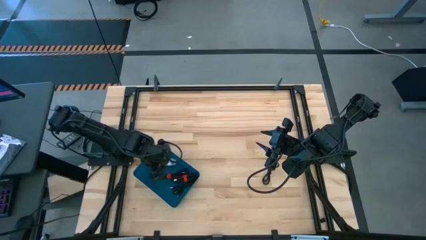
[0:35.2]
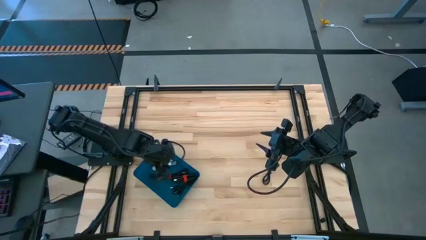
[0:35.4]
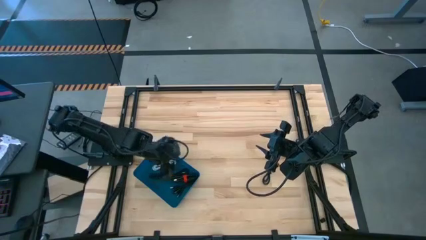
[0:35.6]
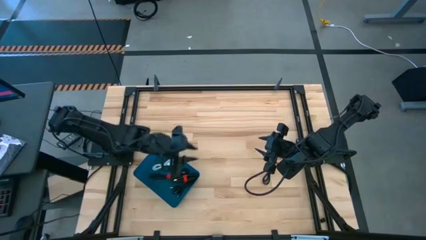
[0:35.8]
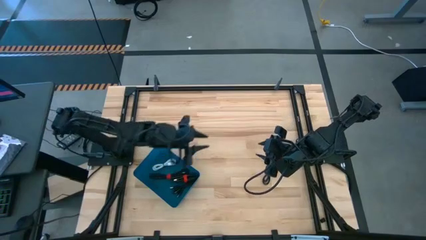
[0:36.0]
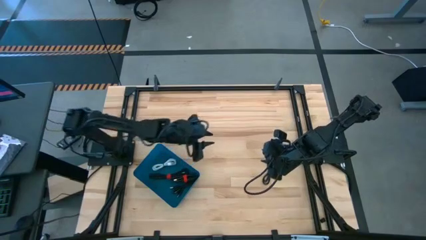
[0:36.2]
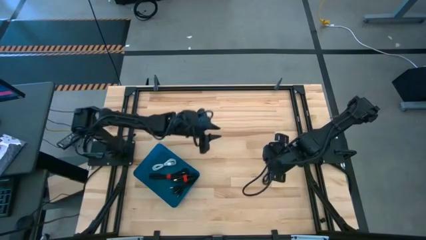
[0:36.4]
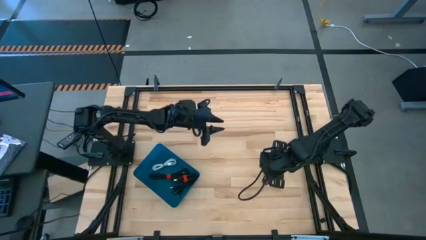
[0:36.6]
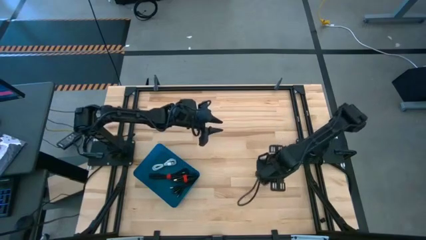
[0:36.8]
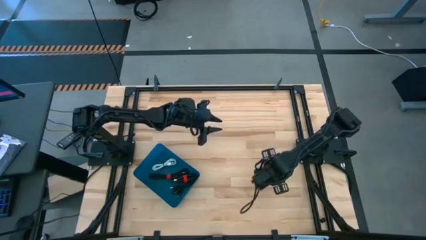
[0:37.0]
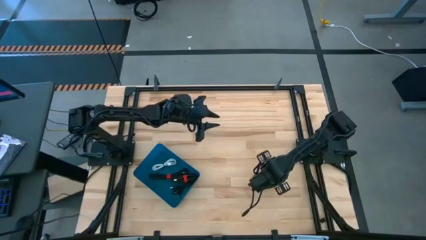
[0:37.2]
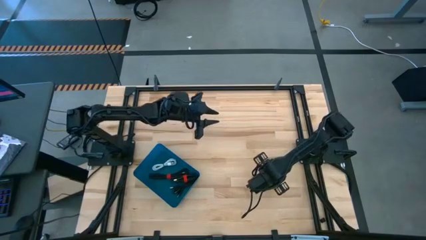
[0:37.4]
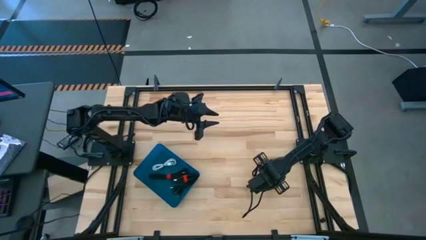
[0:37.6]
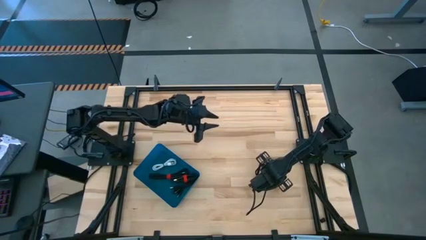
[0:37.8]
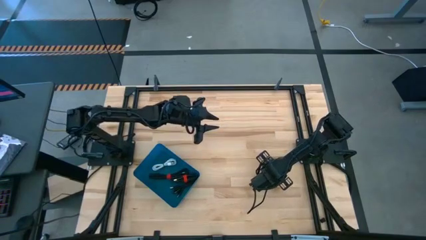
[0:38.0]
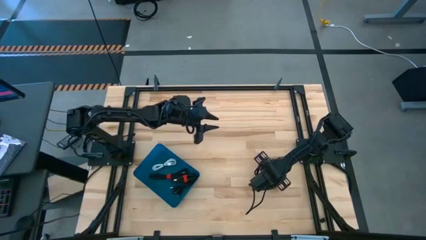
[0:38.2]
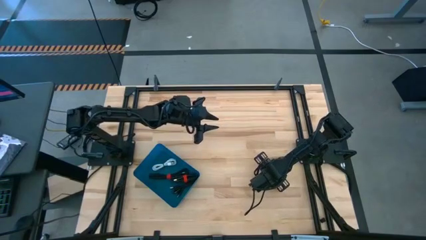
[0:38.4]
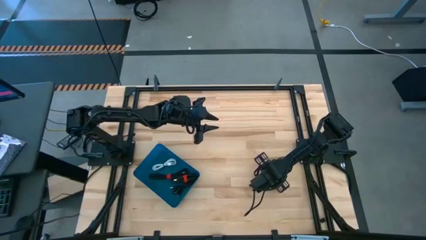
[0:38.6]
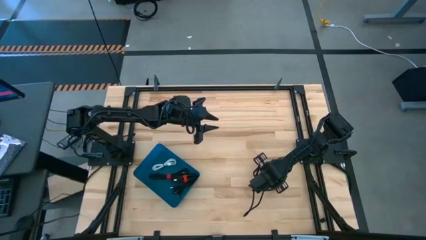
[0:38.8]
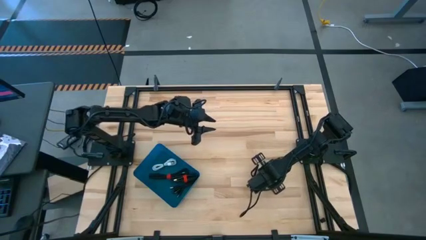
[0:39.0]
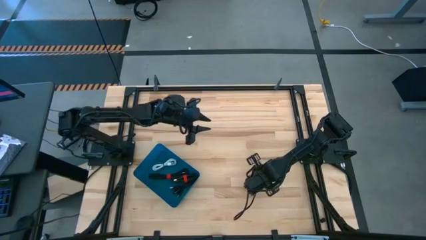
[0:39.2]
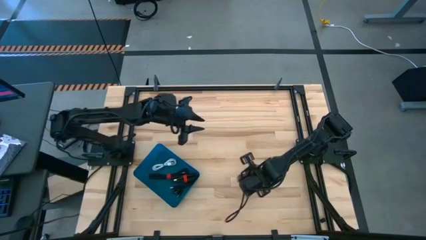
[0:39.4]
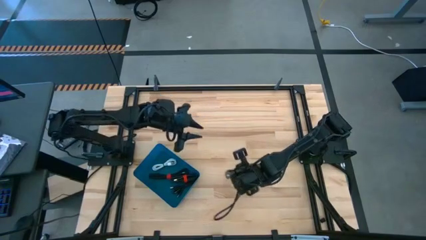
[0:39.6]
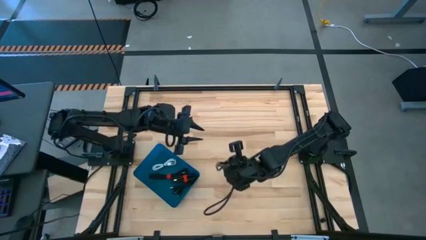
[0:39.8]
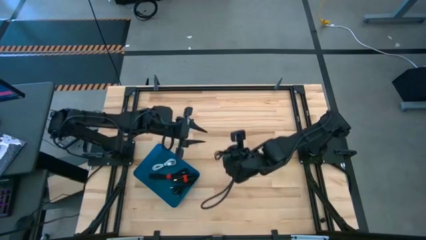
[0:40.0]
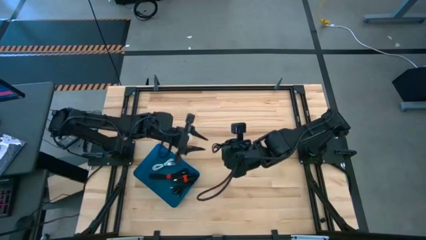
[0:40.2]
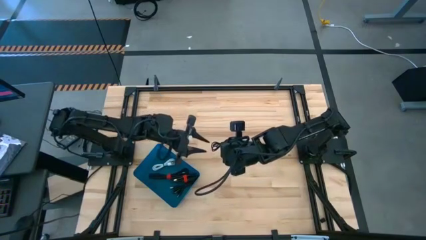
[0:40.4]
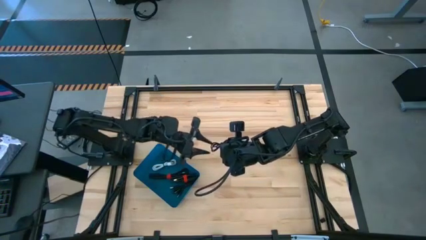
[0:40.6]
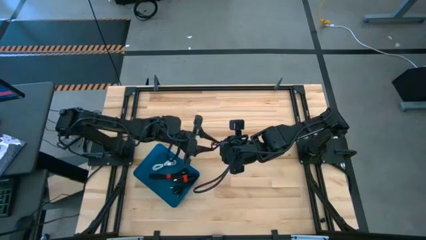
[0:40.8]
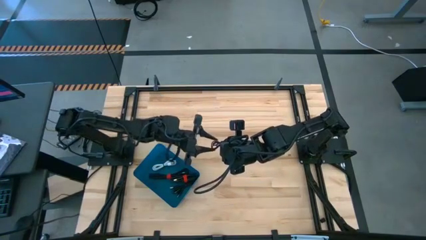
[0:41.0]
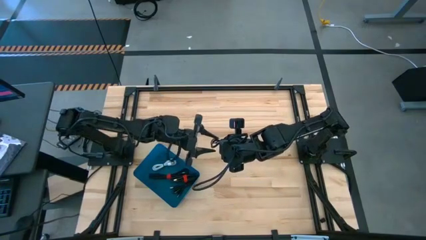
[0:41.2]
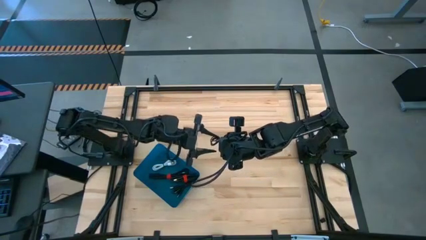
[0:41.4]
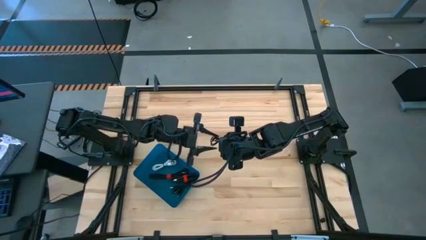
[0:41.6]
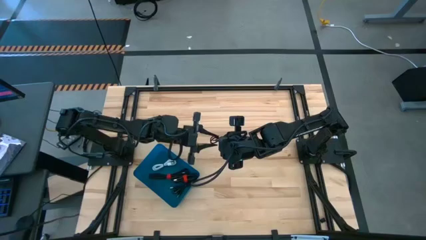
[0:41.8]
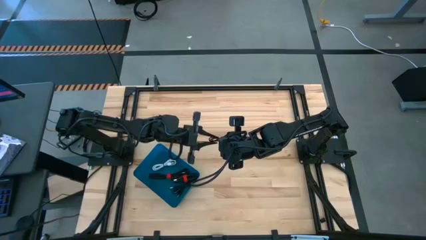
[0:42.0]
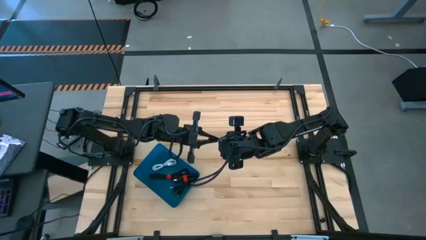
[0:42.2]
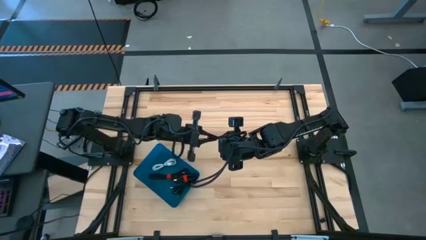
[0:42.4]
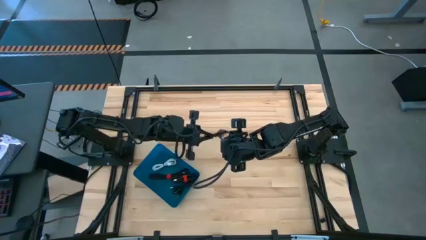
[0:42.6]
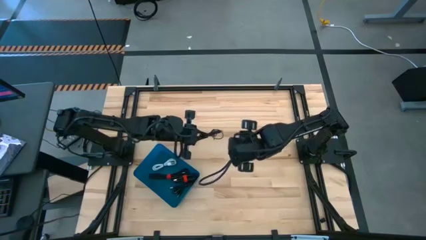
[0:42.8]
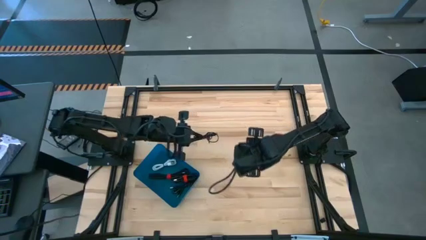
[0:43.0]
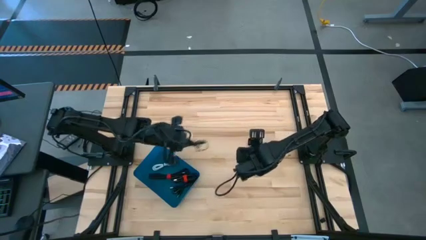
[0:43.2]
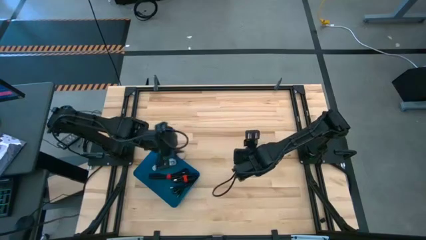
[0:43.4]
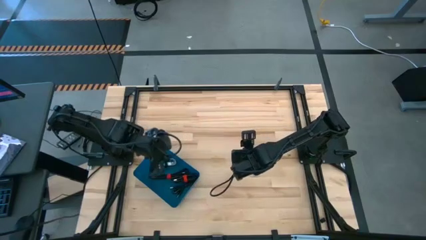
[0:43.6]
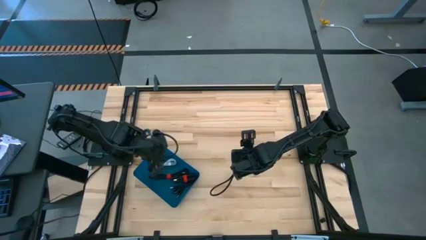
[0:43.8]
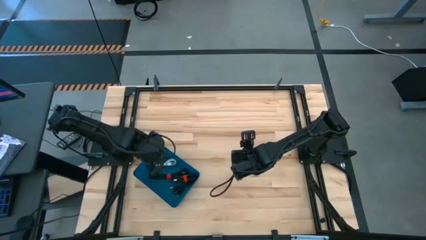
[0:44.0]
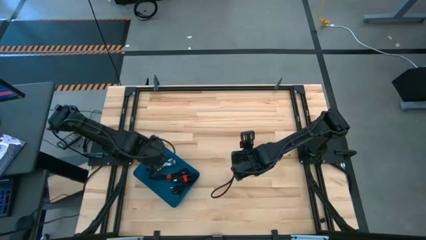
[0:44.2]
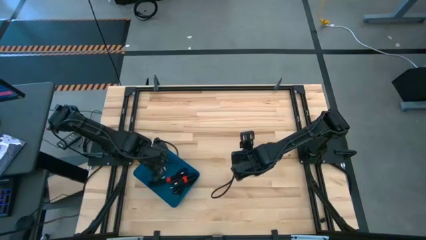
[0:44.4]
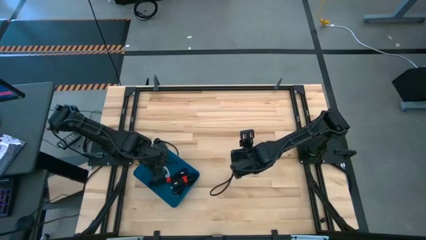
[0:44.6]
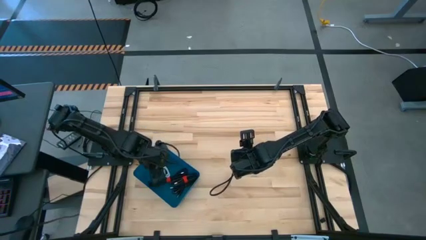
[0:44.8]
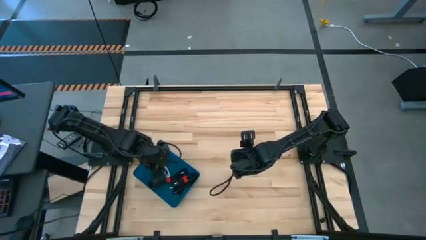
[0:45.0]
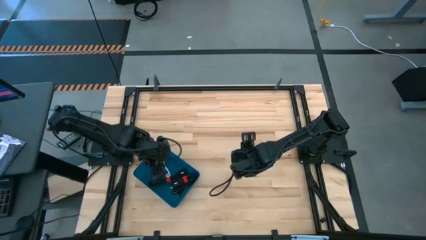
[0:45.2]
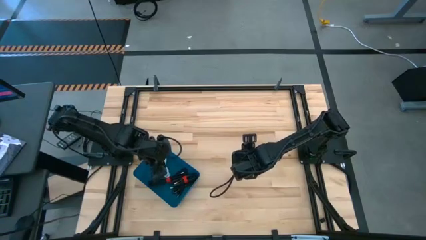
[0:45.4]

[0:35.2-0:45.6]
Task: Pick and place USB-C Cables
Put the black charger cable into the blue bin

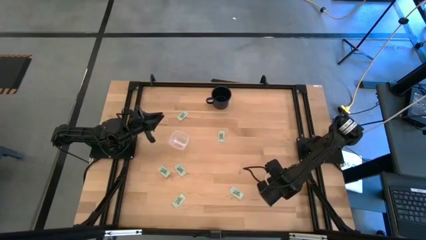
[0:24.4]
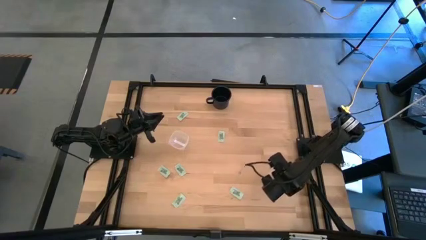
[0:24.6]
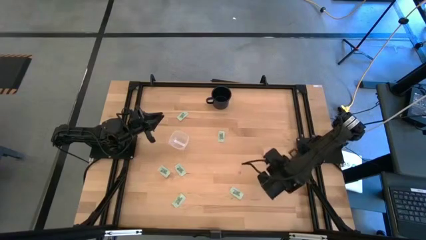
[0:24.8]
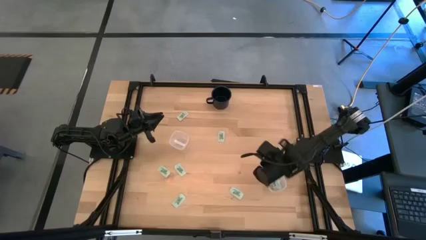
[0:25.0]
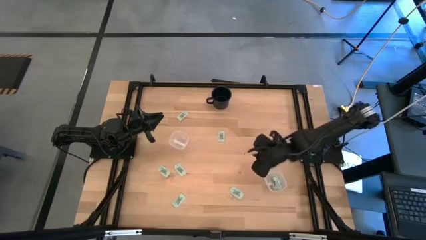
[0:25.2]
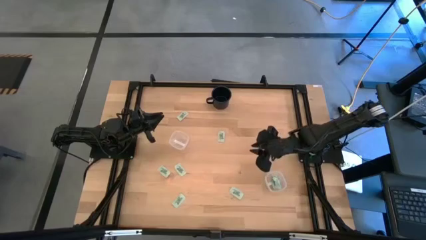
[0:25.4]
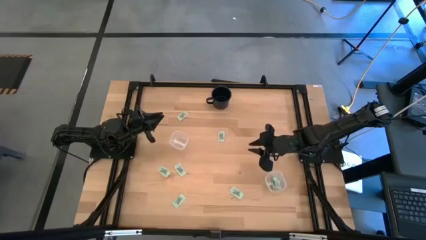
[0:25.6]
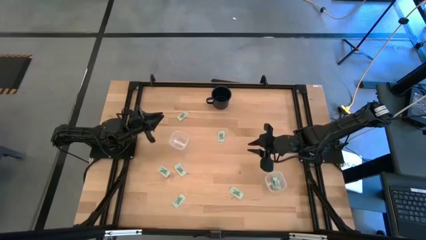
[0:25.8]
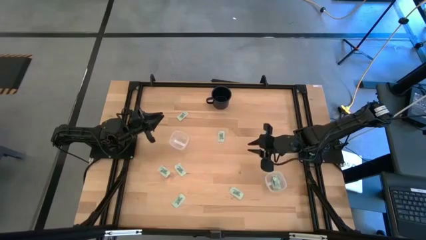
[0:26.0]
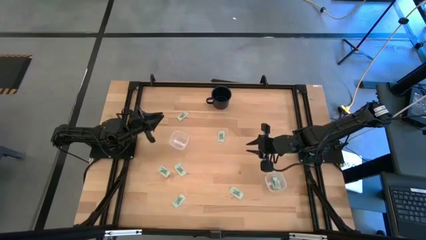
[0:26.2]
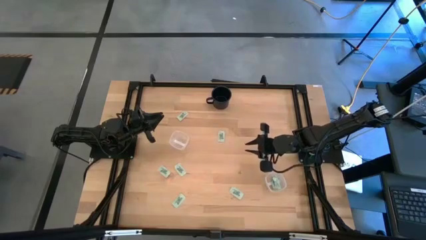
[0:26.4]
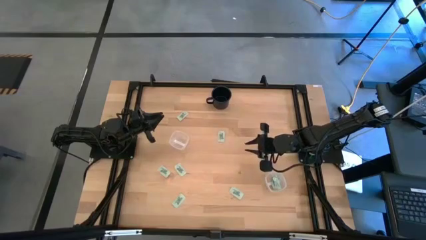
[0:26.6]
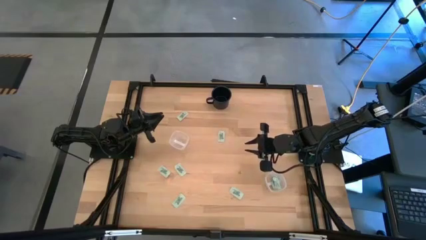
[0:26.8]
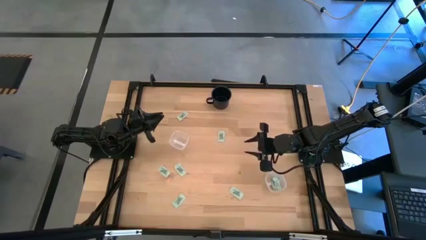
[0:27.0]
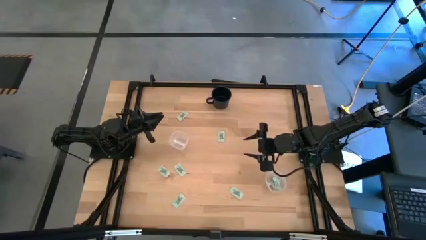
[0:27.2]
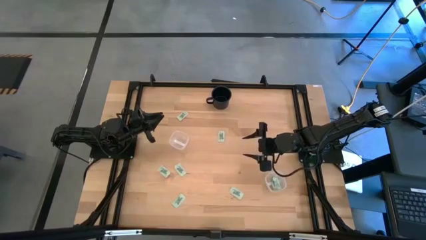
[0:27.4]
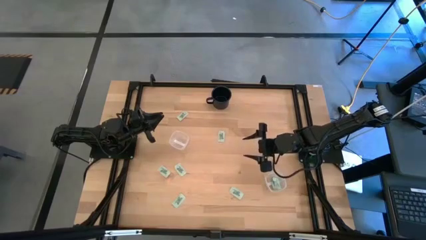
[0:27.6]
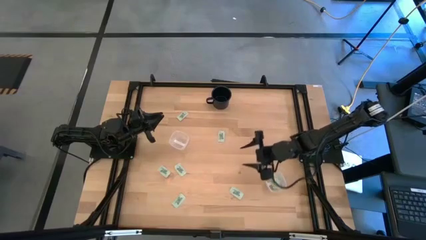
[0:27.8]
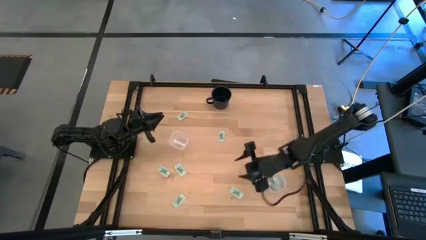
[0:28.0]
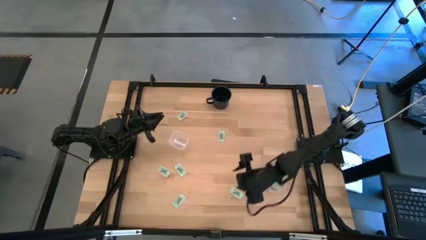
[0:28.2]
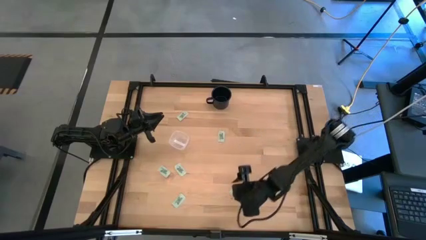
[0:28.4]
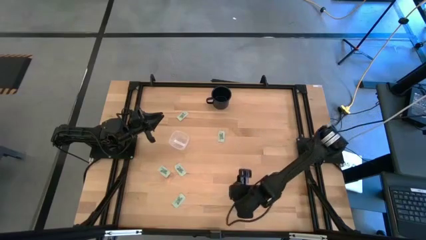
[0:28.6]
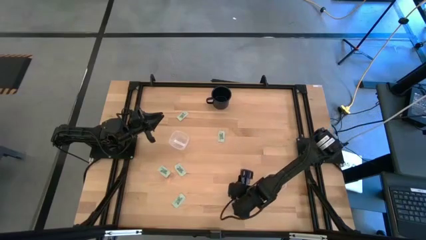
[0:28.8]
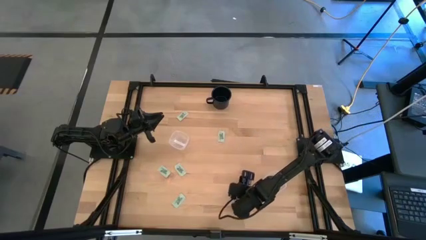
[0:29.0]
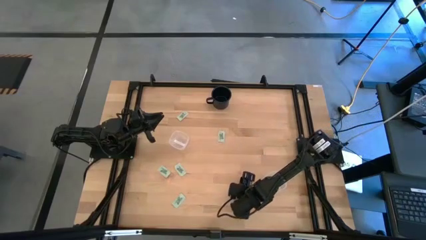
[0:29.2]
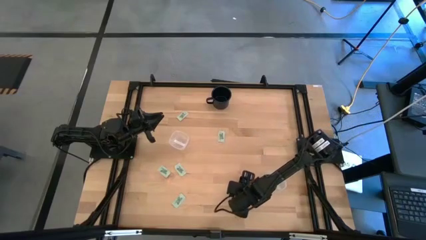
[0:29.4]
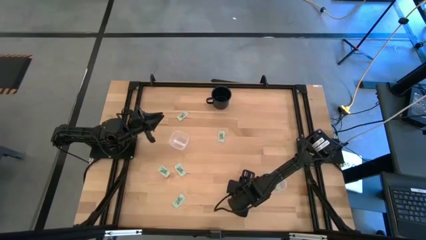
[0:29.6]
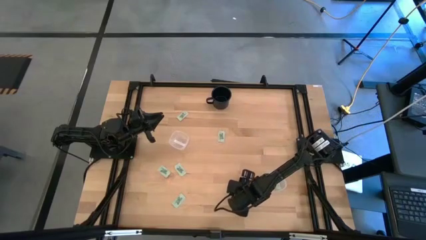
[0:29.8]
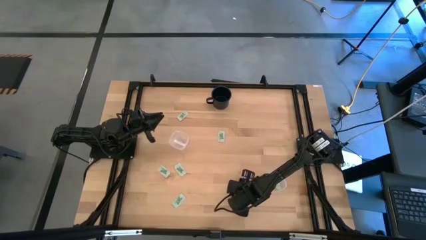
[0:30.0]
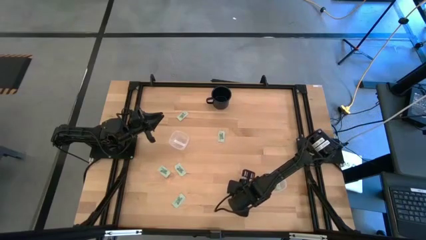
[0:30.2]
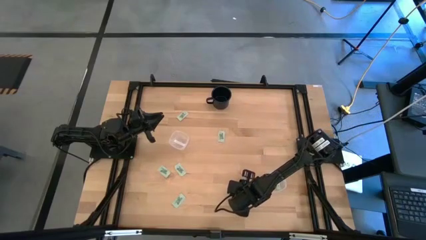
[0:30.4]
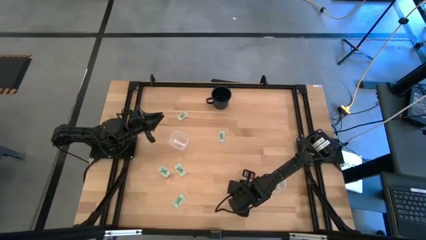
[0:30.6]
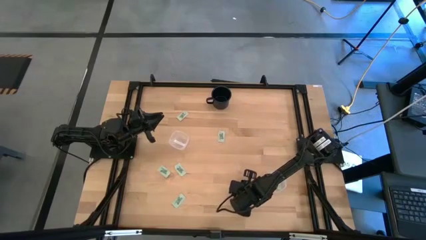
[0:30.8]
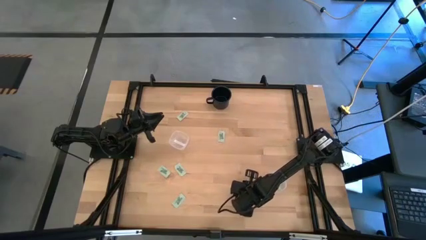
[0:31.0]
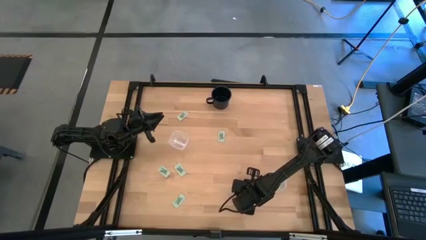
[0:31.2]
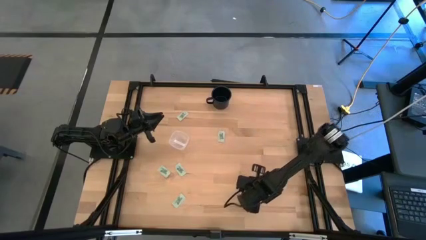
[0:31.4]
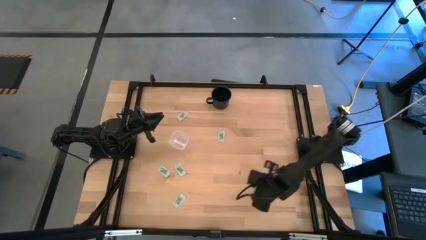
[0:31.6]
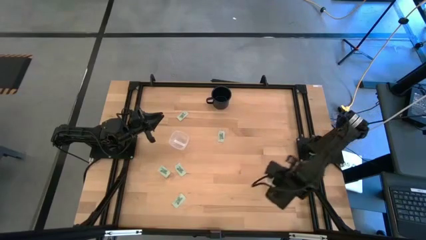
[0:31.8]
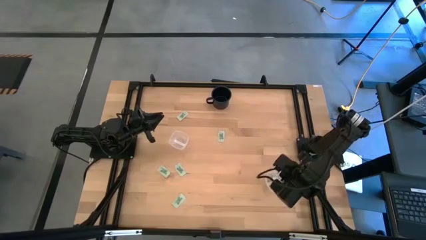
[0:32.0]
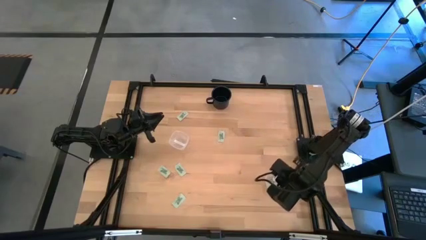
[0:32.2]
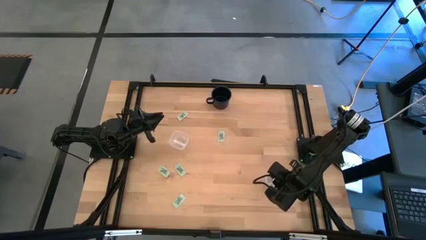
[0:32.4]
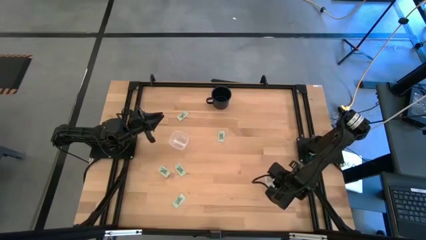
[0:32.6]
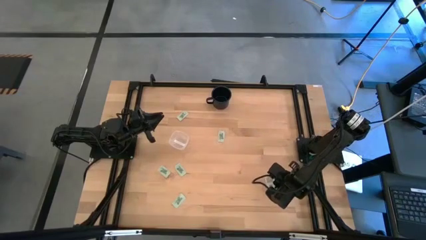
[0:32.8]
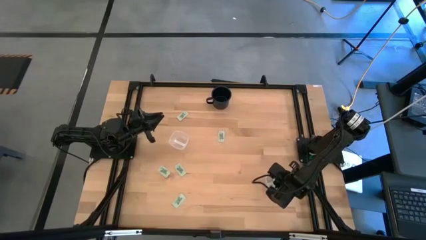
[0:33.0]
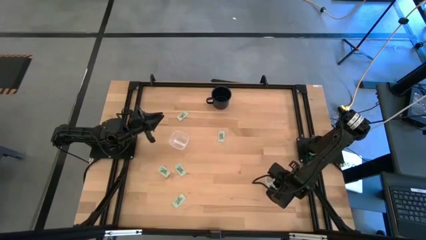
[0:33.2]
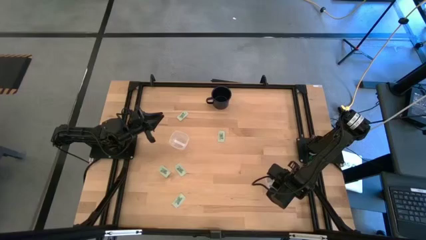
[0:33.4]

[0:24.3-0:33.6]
Task: Pick and place items into bin
Put the white stevia packet into the bottom transparent bin
